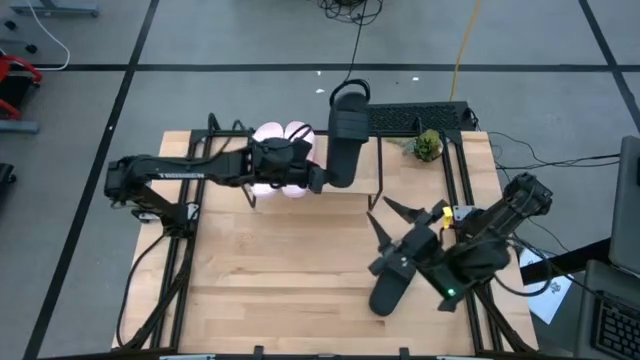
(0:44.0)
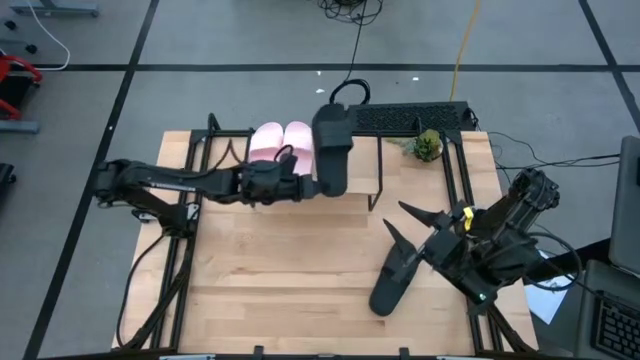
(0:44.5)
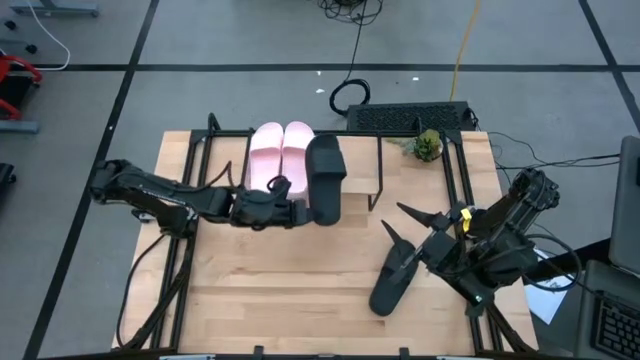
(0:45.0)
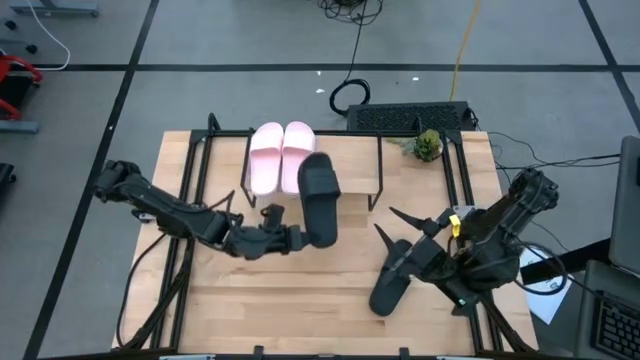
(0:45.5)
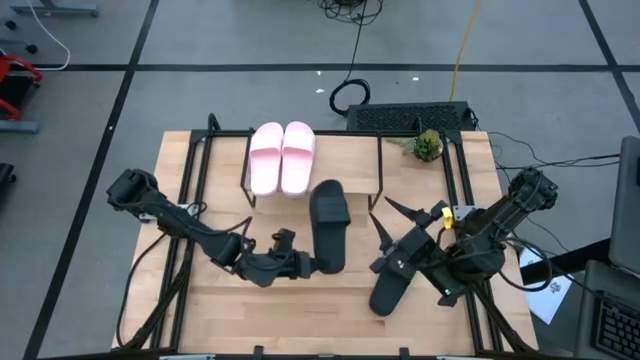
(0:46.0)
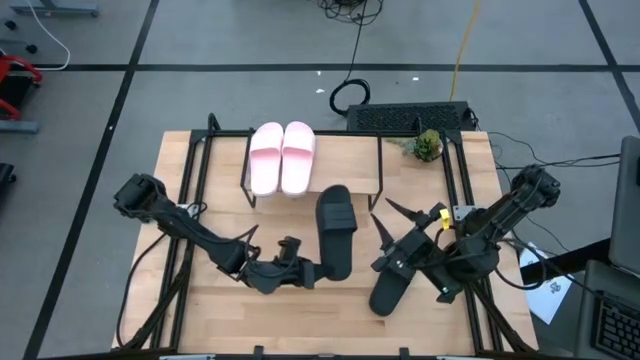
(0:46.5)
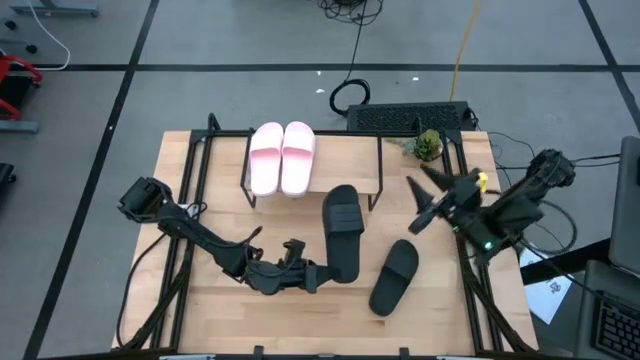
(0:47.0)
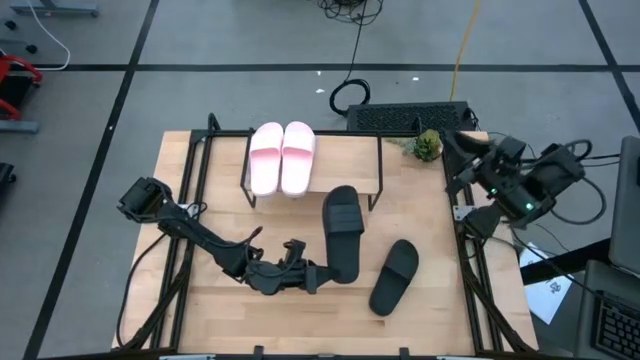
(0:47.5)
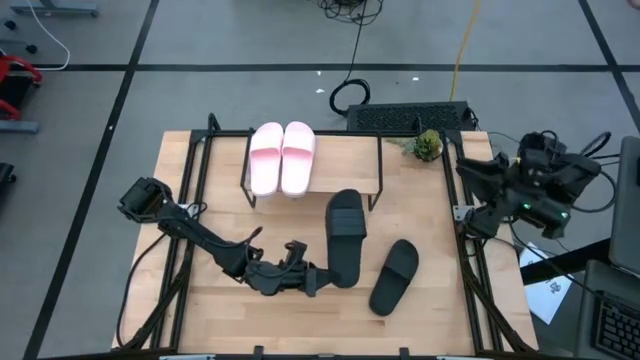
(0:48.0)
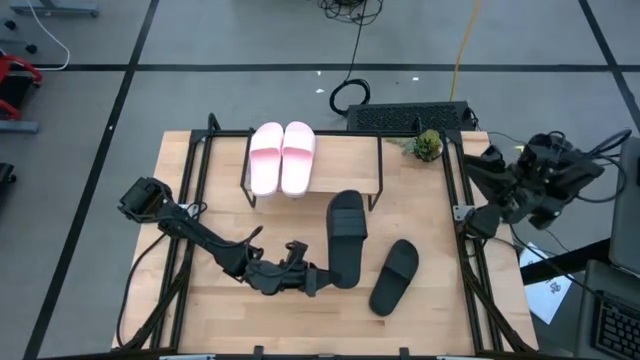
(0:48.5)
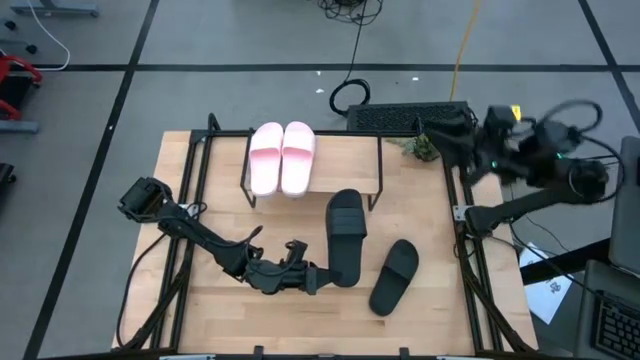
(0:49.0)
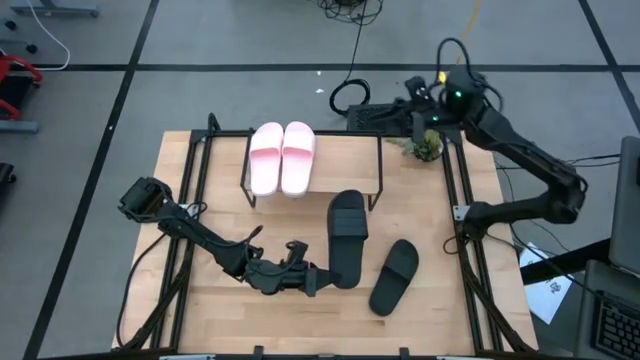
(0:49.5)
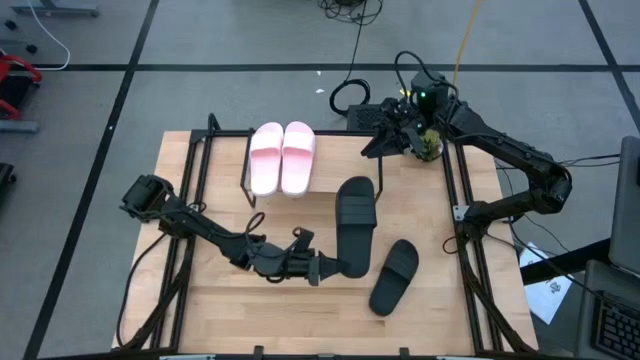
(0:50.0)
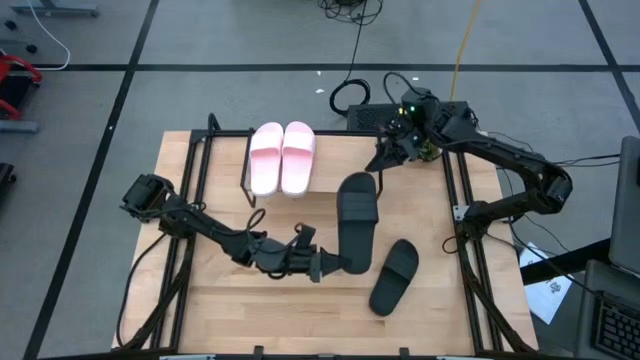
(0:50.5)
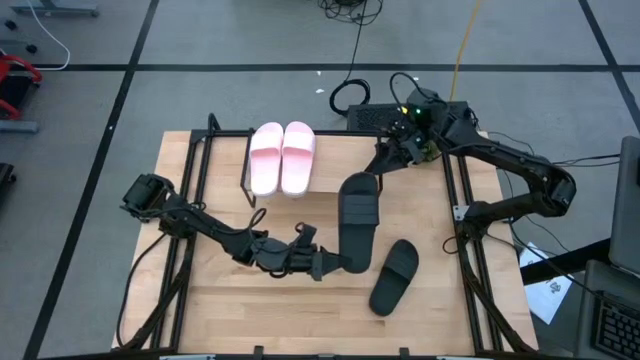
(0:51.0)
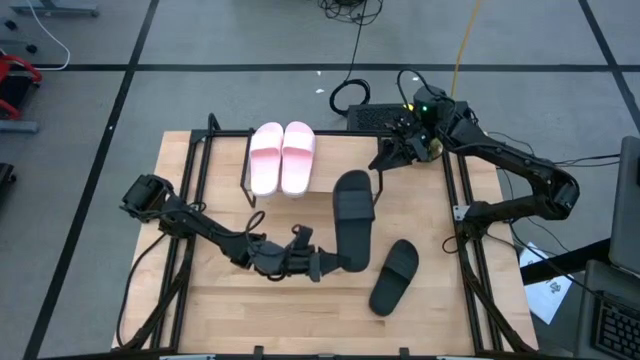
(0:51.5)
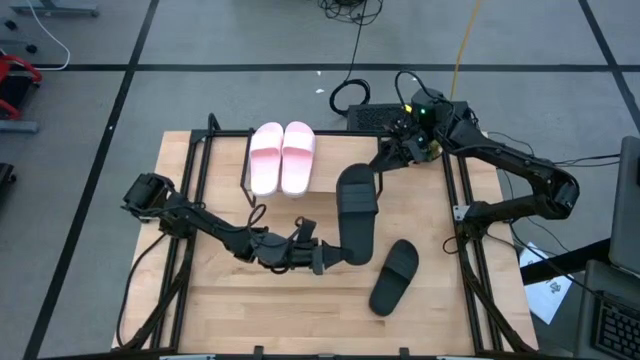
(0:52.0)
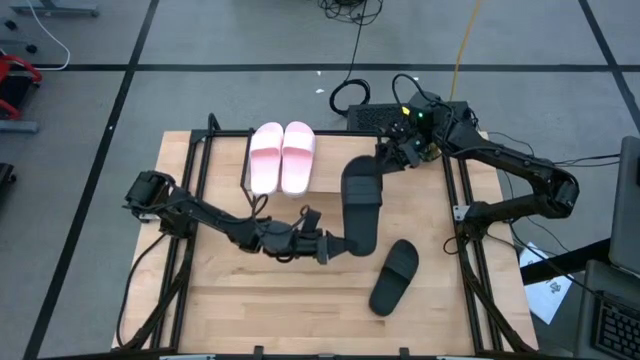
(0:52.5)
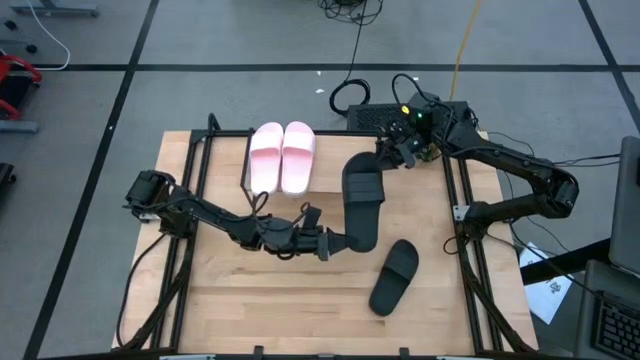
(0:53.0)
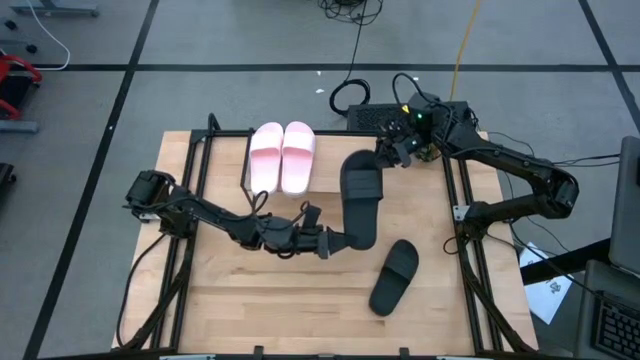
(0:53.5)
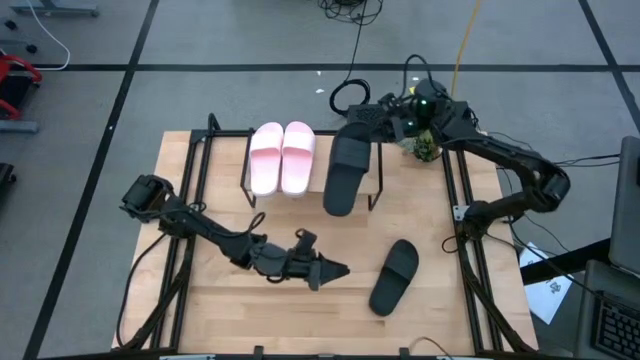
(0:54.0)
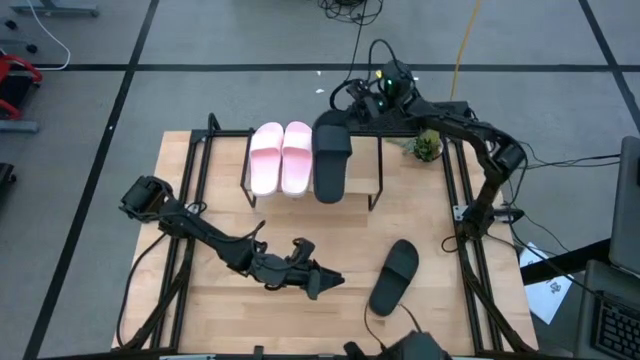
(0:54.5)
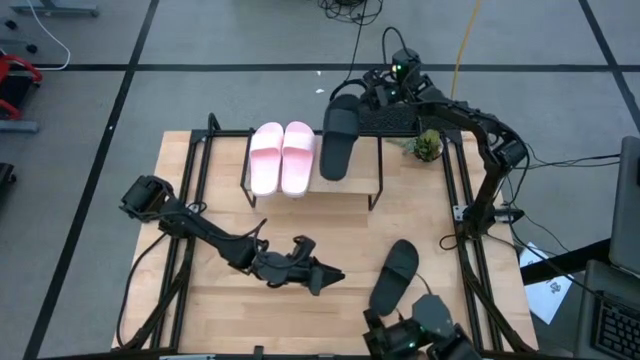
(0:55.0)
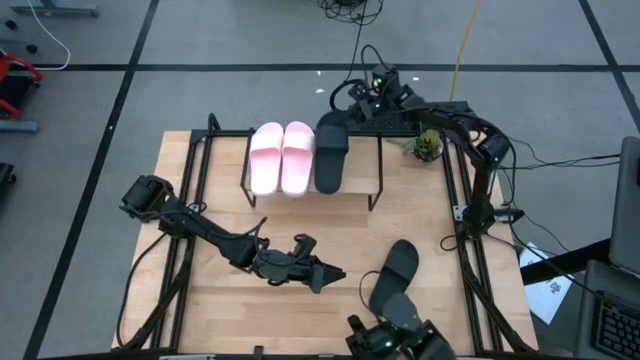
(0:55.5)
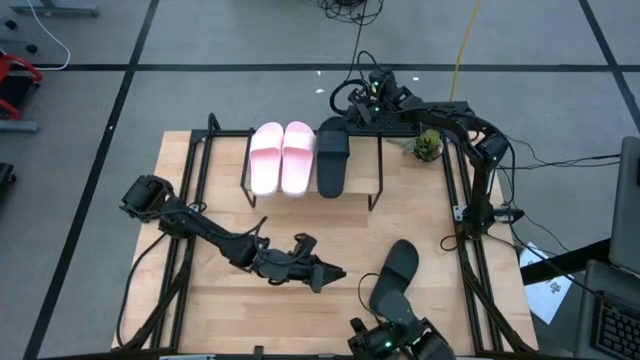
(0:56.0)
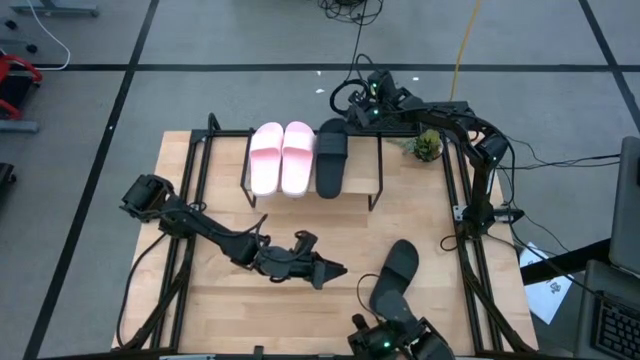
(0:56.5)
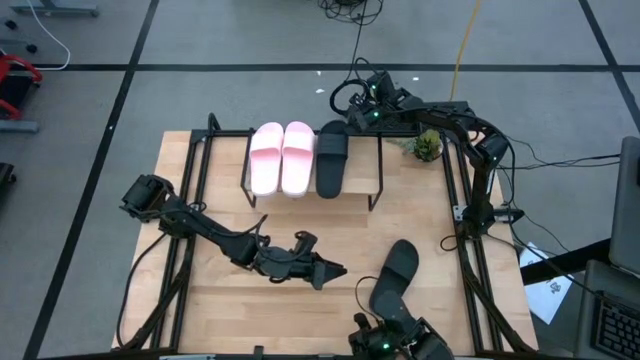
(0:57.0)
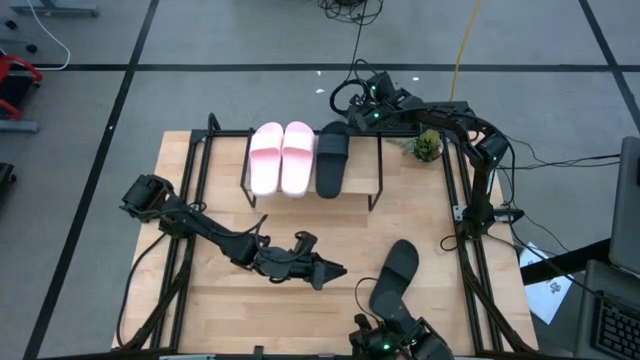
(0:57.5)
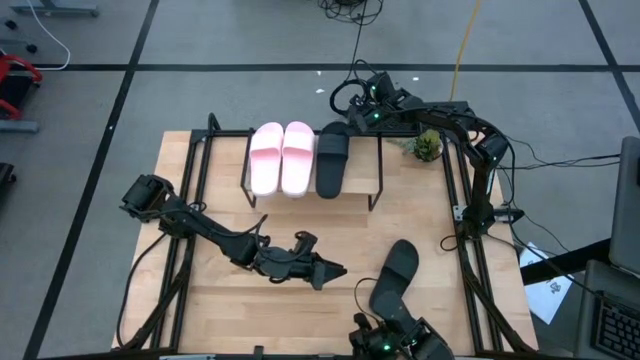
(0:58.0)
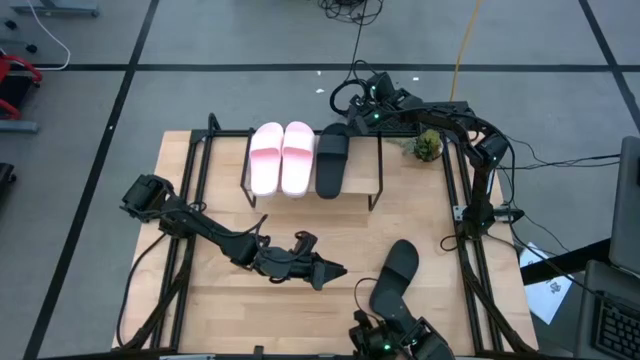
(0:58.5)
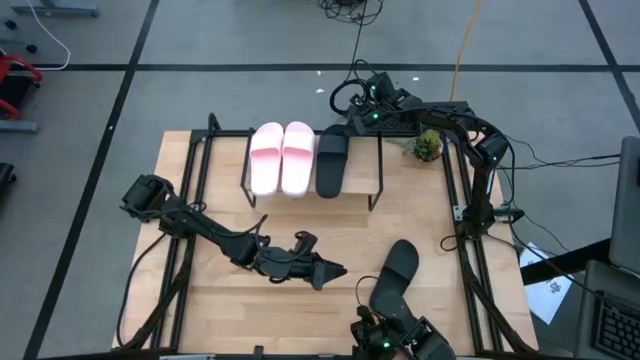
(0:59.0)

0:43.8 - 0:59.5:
Task: Pick and place slides into the shelf
Put the left black slides on the shelf

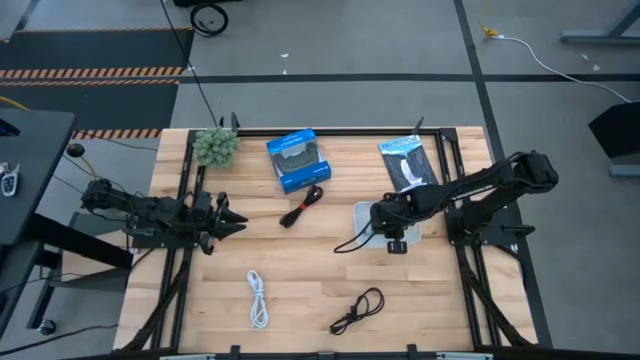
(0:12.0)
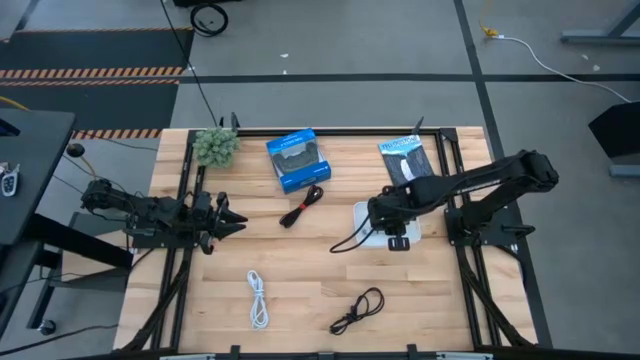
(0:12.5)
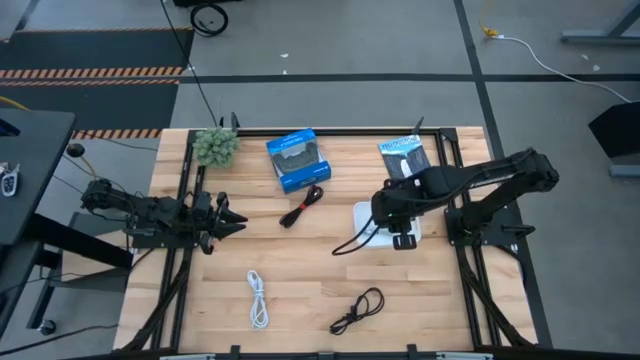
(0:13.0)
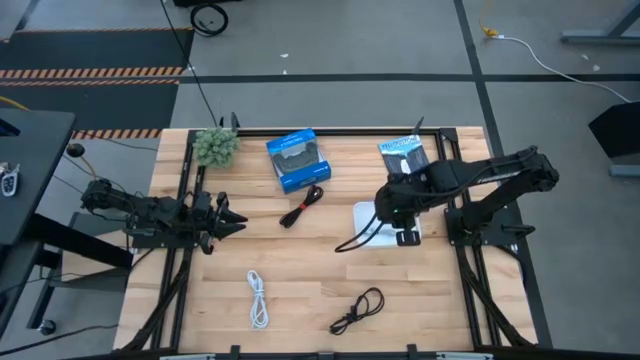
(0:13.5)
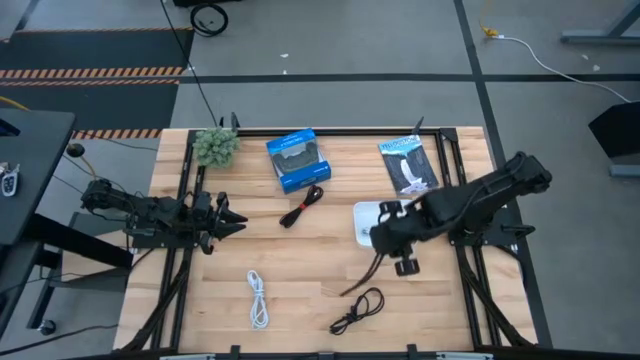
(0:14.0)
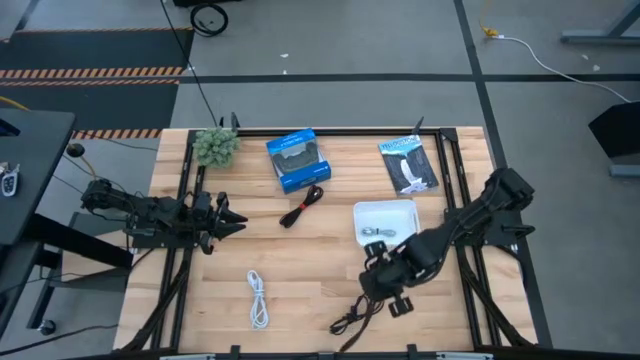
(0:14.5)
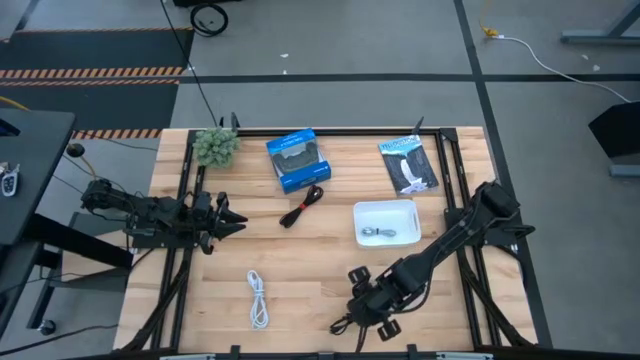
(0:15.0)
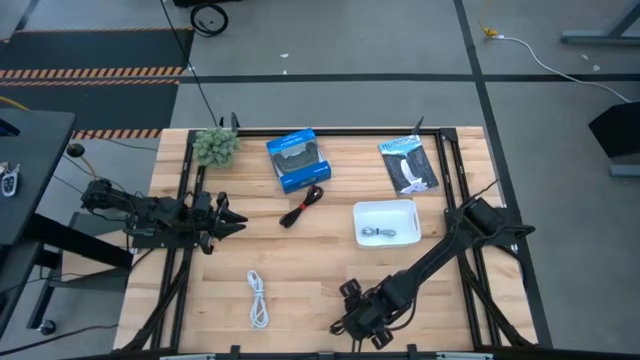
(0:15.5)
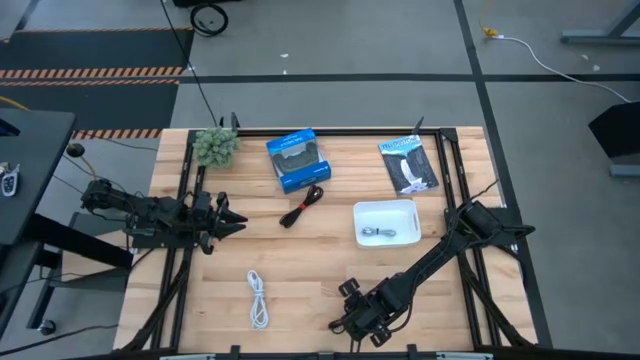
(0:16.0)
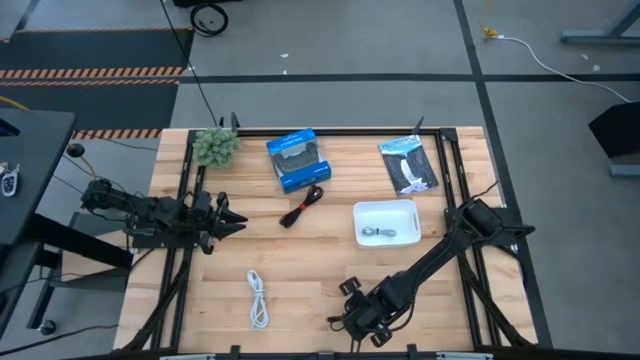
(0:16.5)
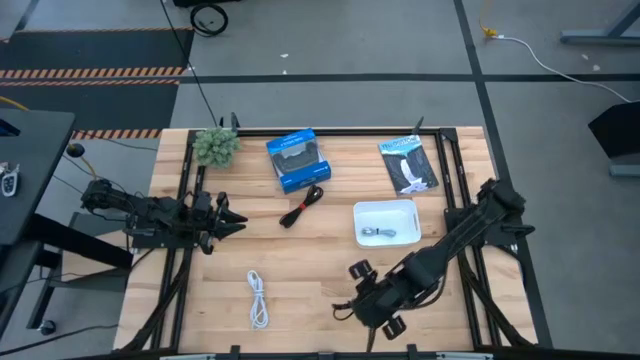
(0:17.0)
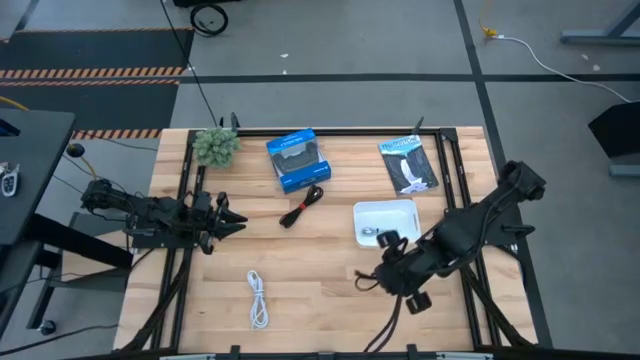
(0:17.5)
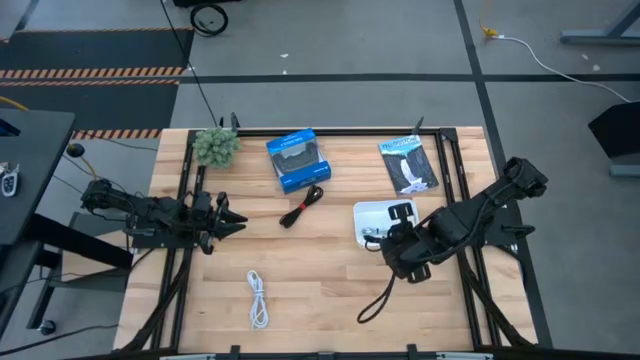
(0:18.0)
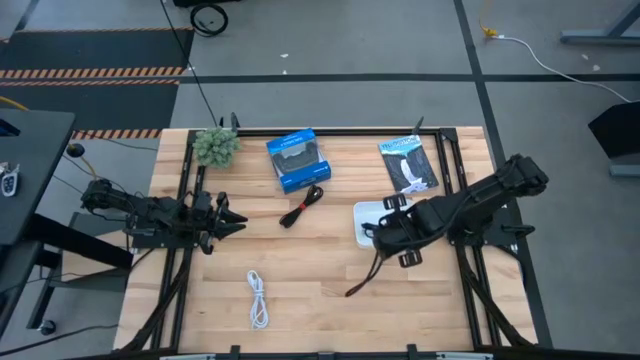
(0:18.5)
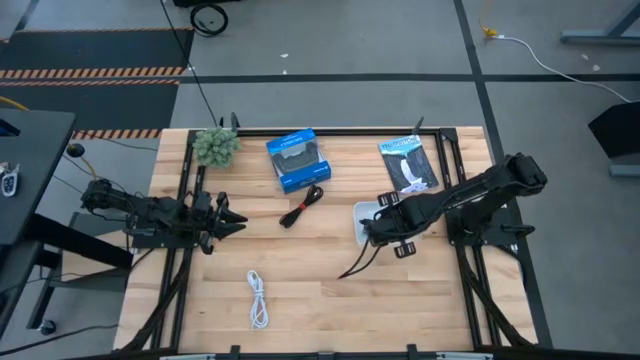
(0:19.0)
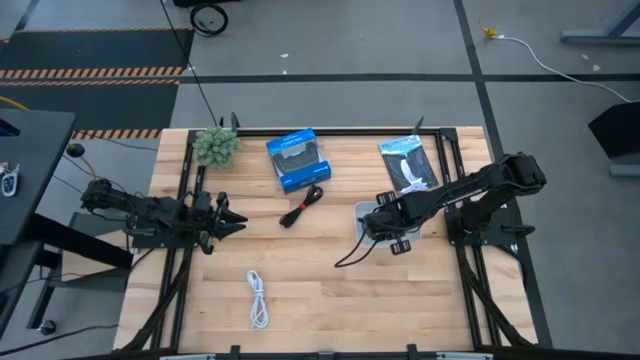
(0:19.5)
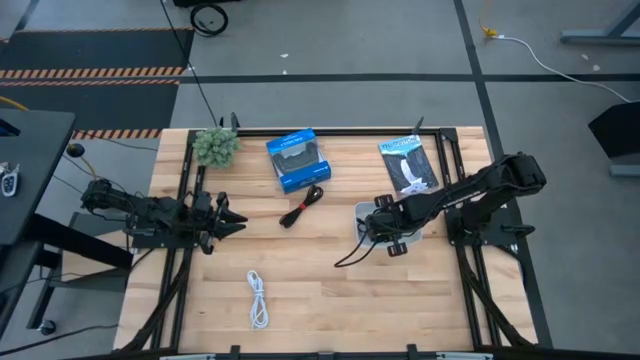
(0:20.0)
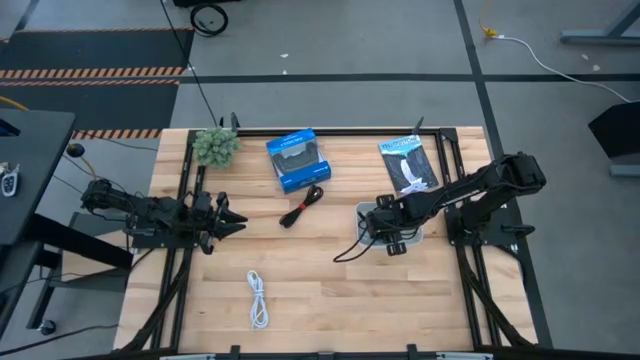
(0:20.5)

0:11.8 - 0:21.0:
Task: Pick and place USB-C Cables
Put the bottom black USB cable into the white bin
